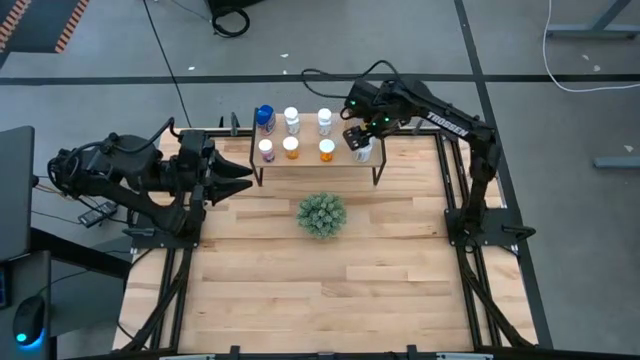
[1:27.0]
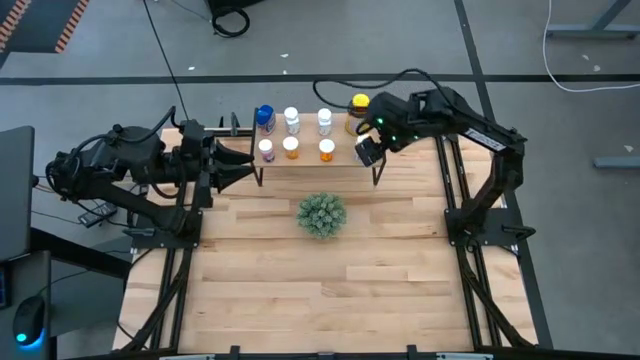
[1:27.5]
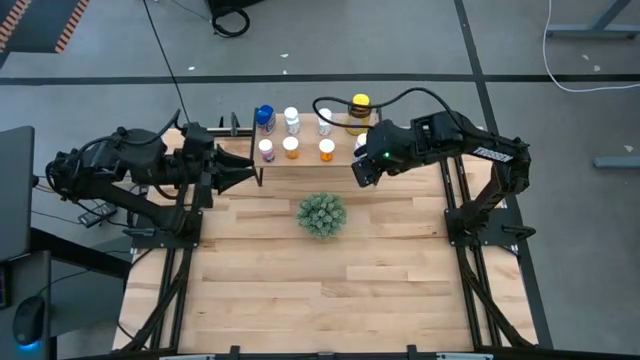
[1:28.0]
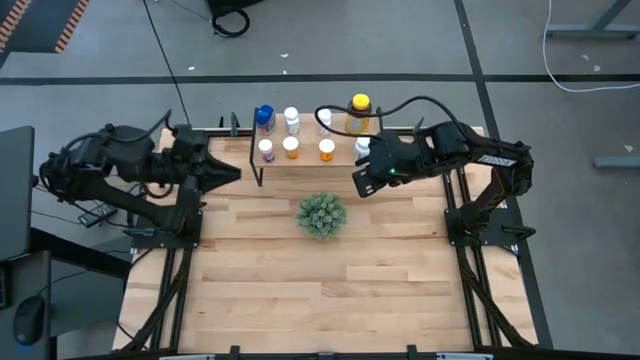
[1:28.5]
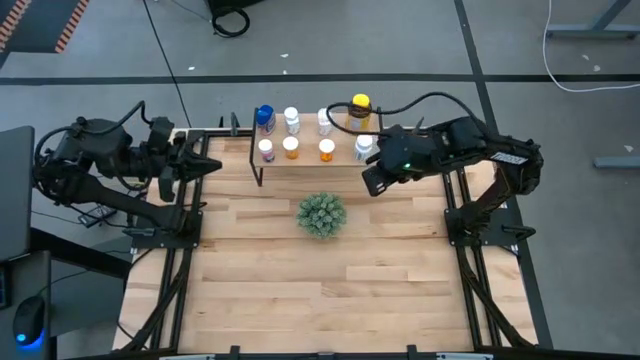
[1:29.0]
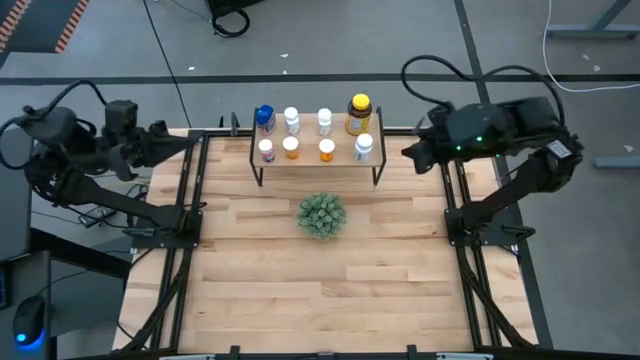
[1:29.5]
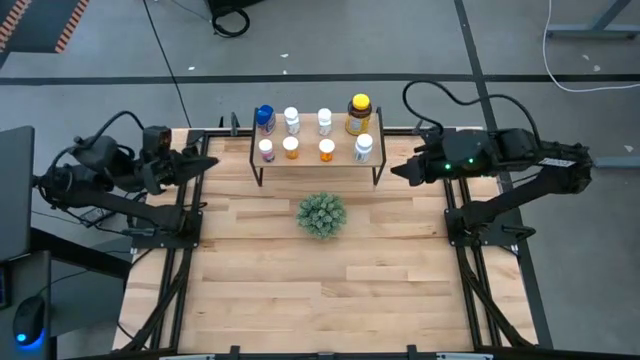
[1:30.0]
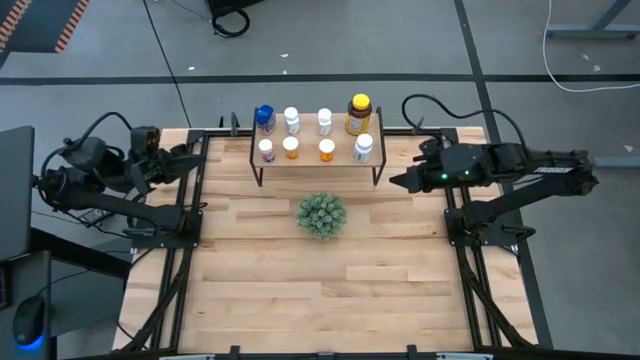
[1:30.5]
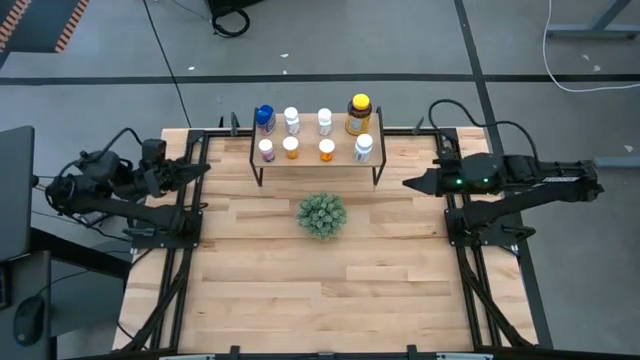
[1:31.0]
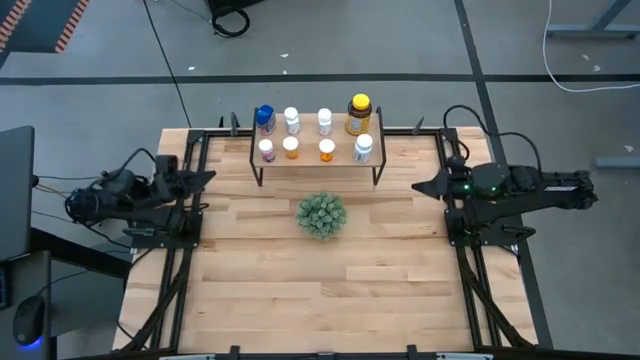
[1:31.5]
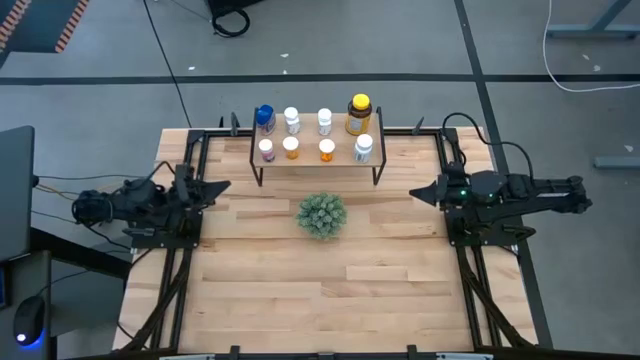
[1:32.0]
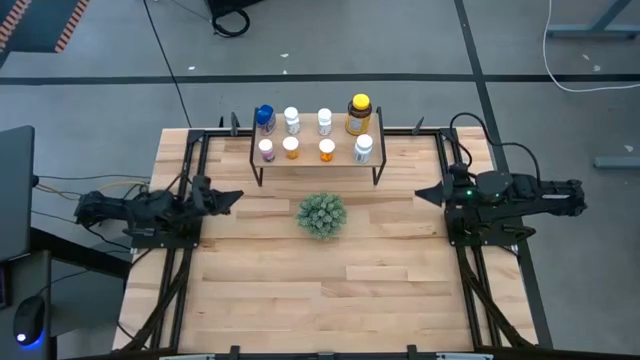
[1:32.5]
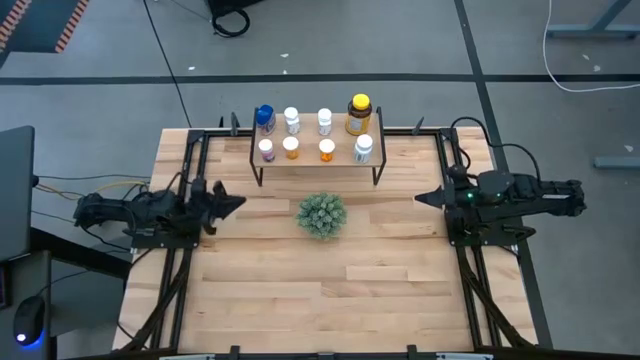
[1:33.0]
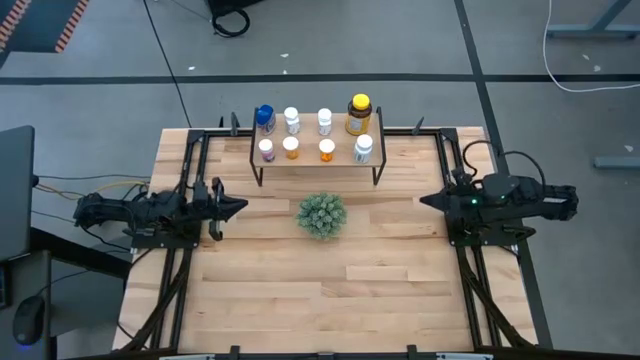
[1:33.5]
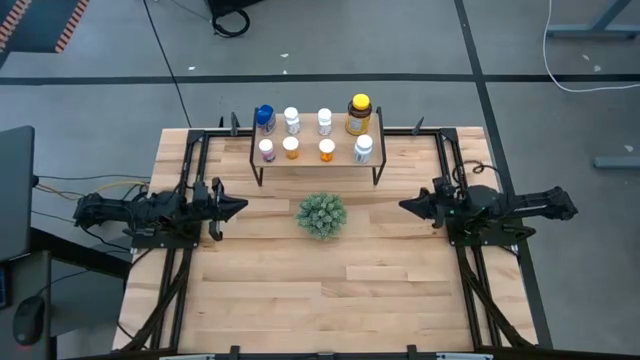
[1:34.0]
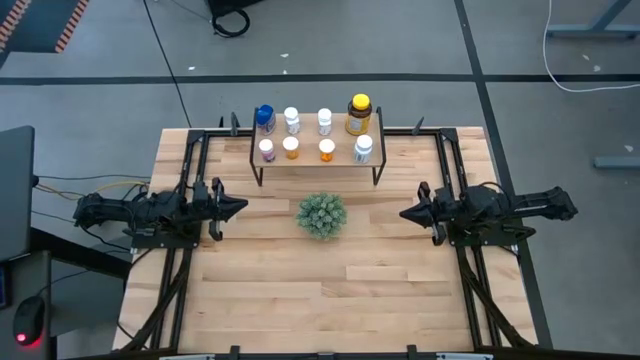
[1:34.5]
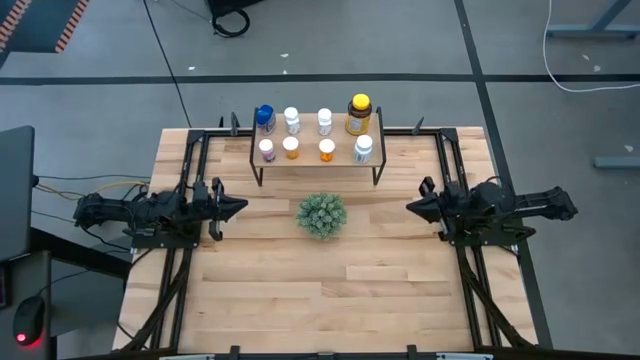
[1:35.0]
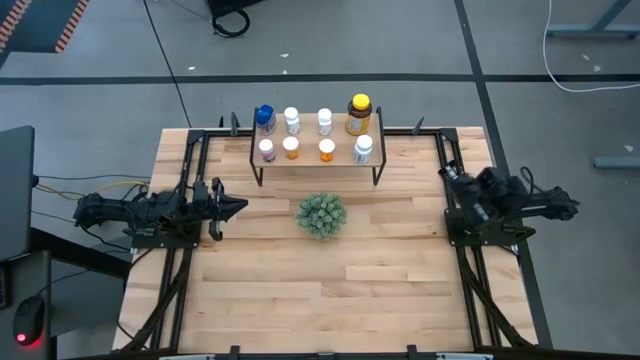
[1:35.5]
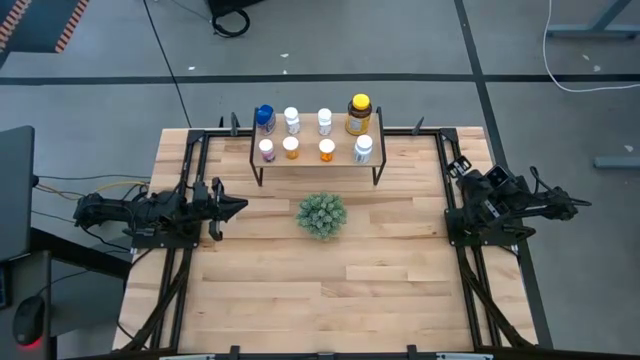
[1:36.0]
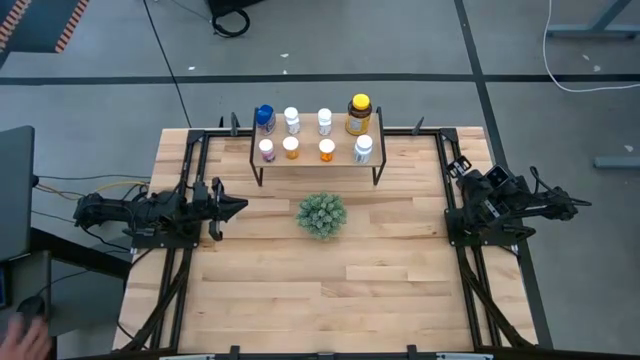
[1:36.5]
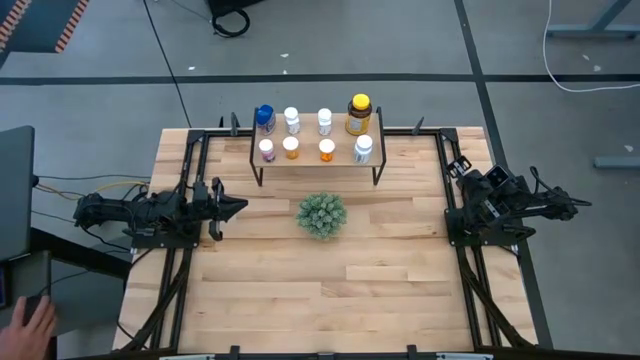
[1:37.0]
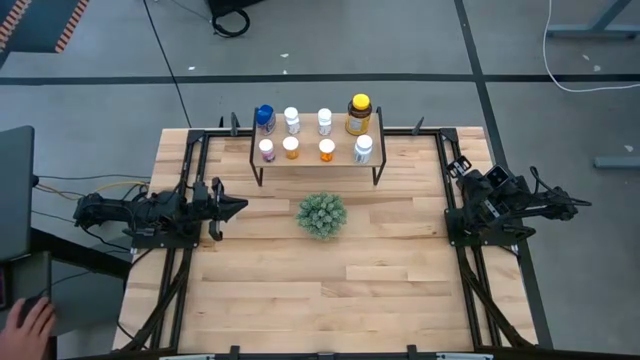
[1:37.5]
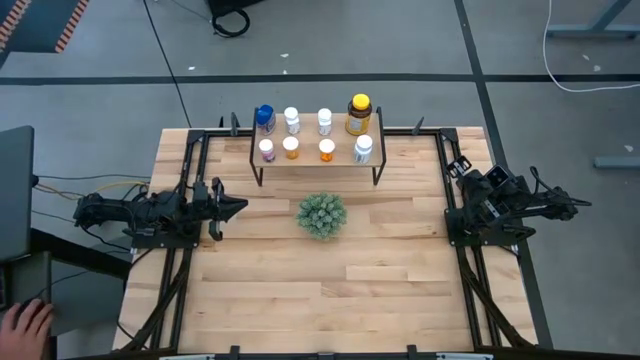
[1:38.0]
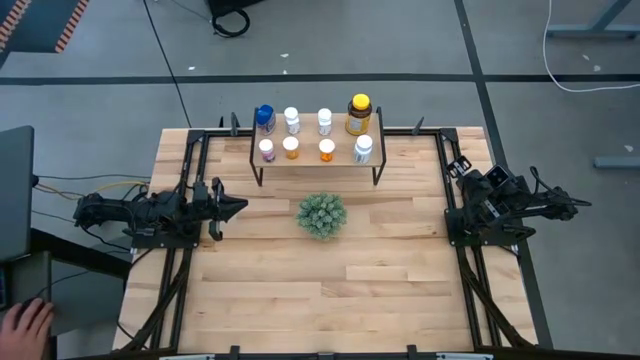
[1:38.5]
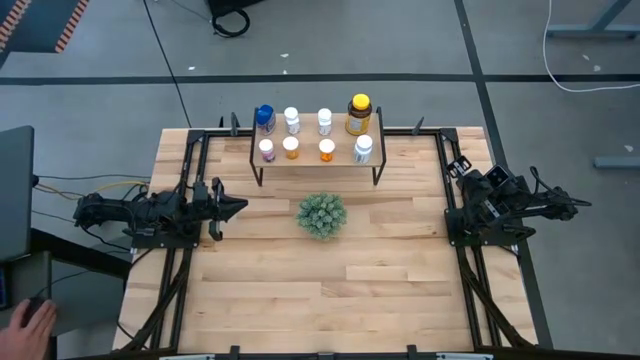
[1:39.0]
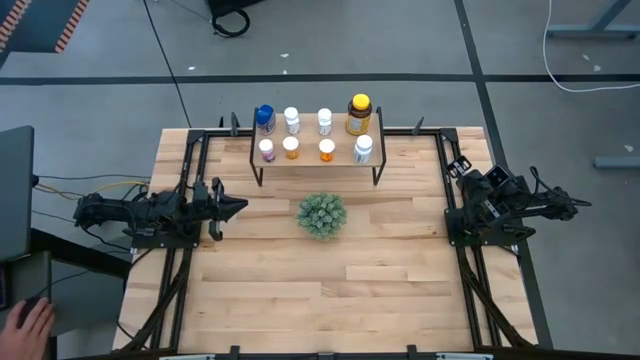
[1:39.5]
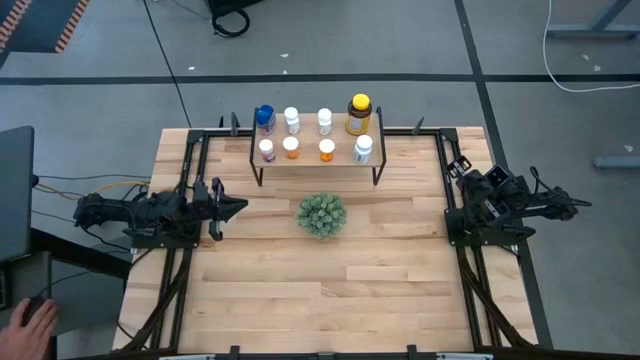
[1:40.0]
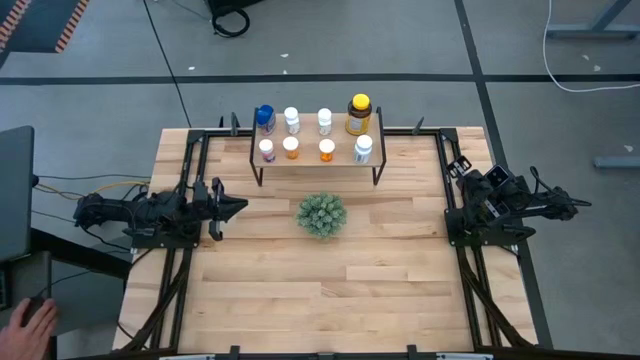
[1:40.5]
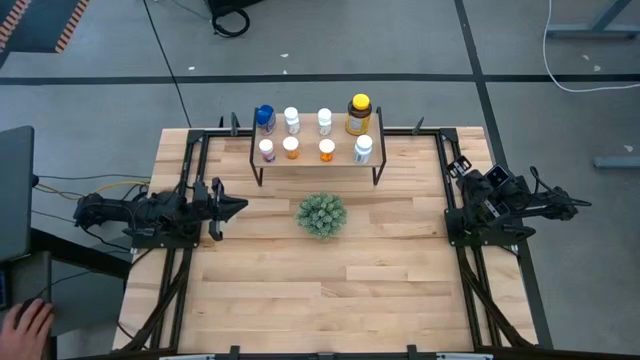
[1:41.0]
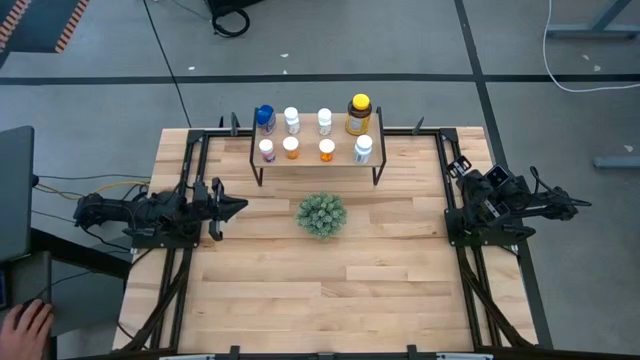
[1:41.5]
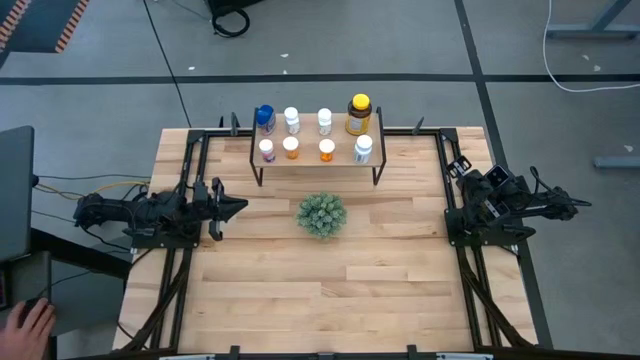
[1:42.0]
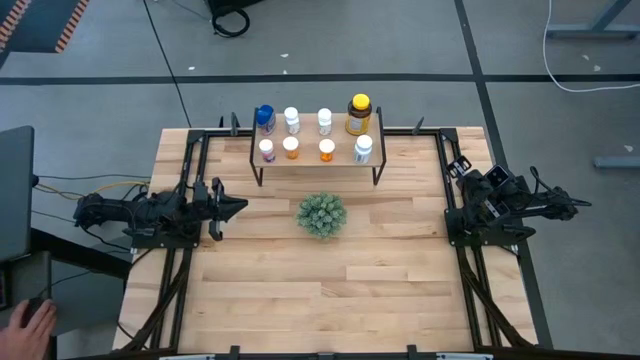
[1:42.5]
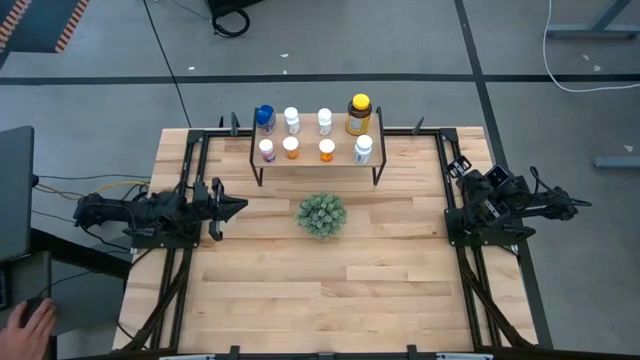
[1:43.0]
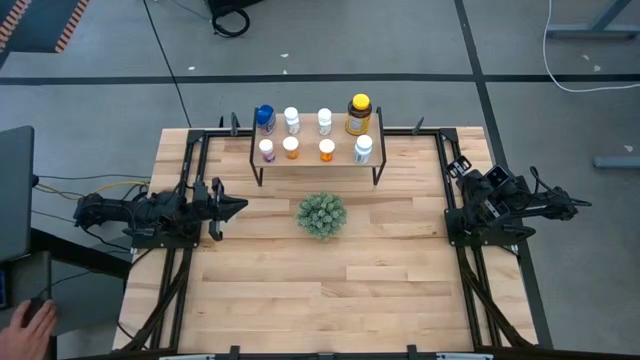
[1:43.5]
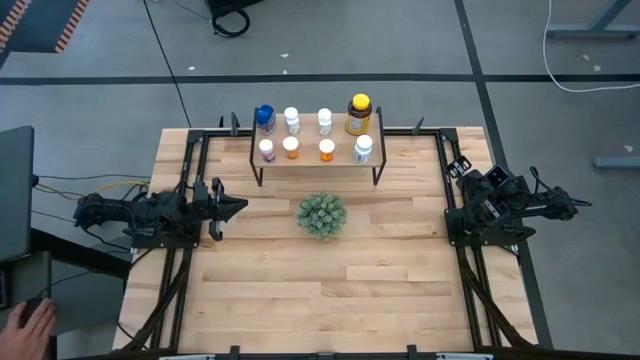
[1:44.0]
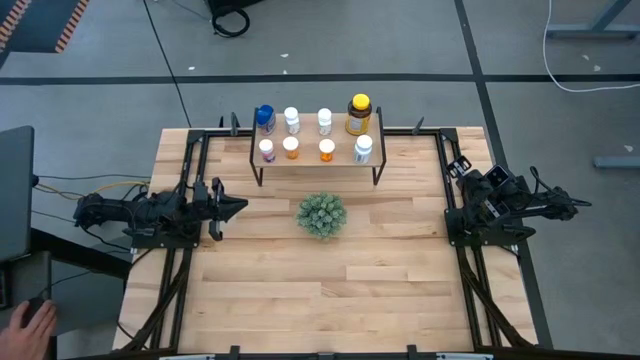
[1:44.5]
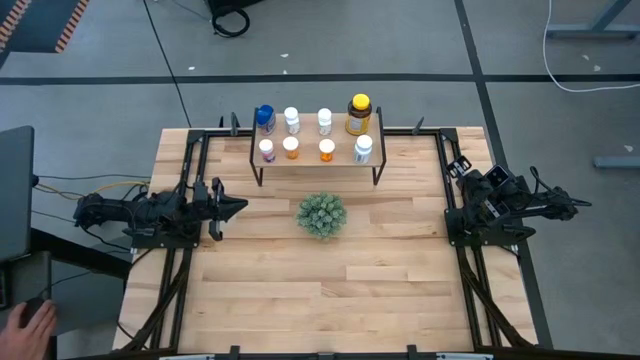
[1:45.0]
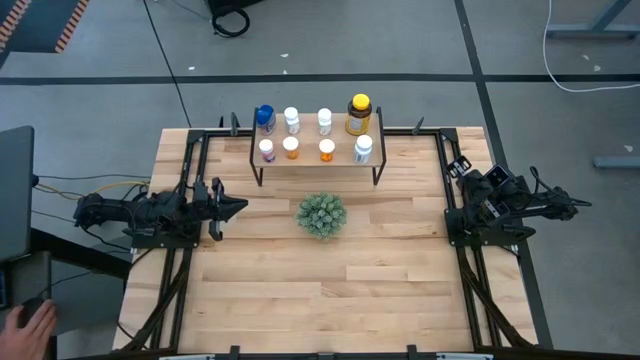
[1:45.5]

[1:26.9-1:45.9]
Task: Pick and place medicine bottles onto shelf by color
Return to Home Position

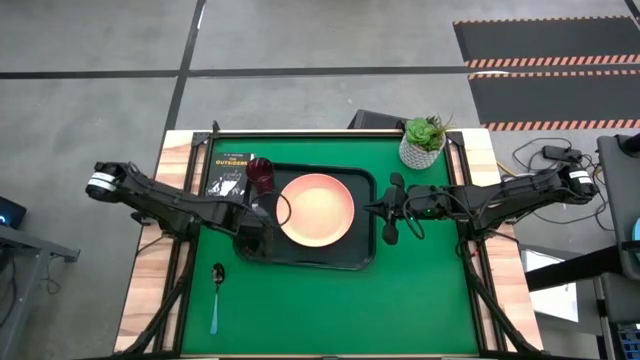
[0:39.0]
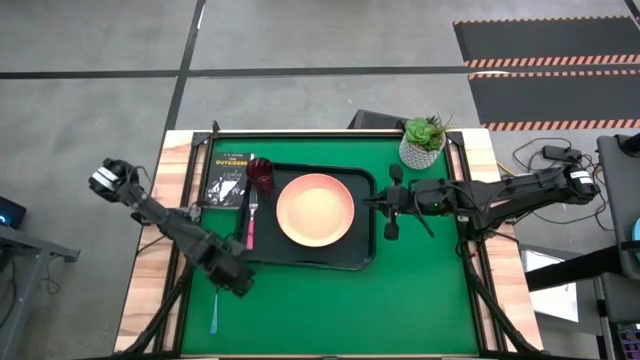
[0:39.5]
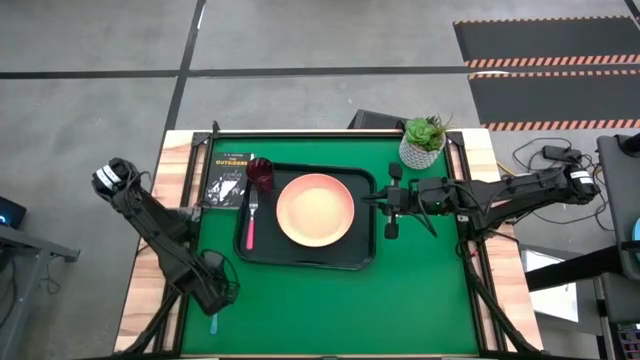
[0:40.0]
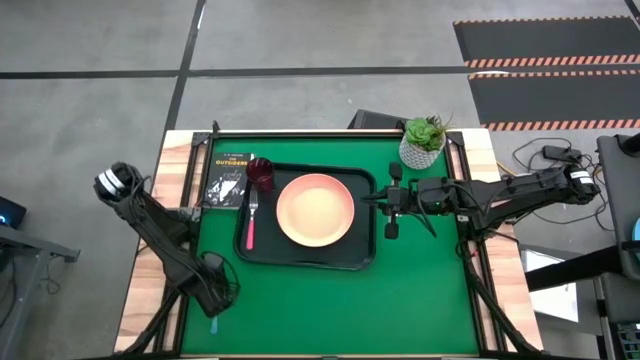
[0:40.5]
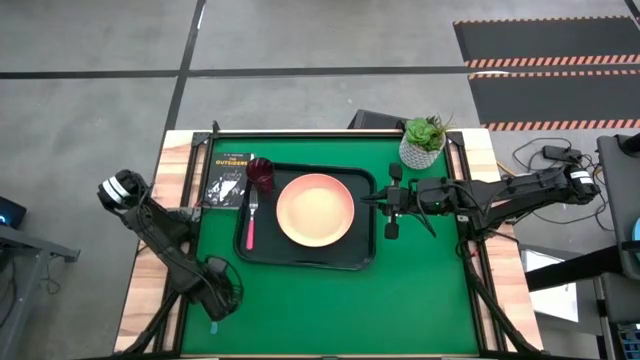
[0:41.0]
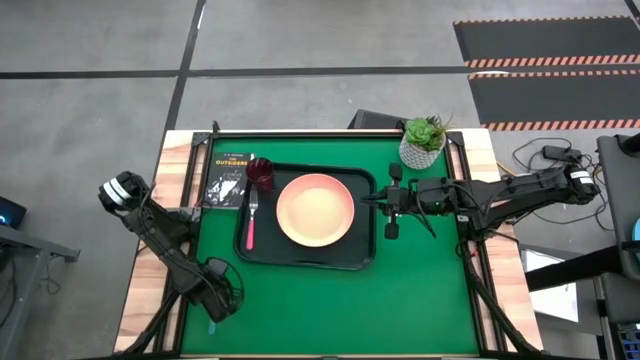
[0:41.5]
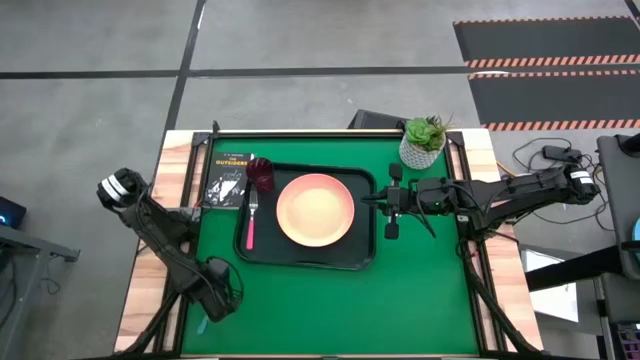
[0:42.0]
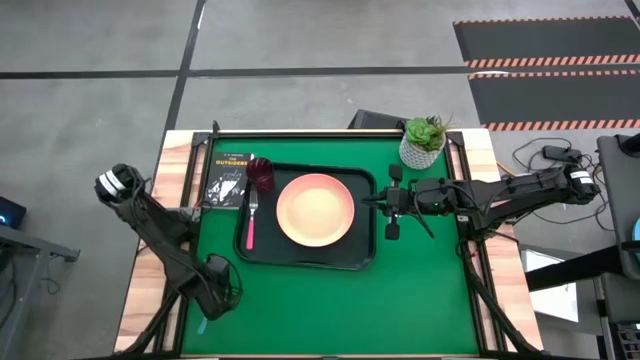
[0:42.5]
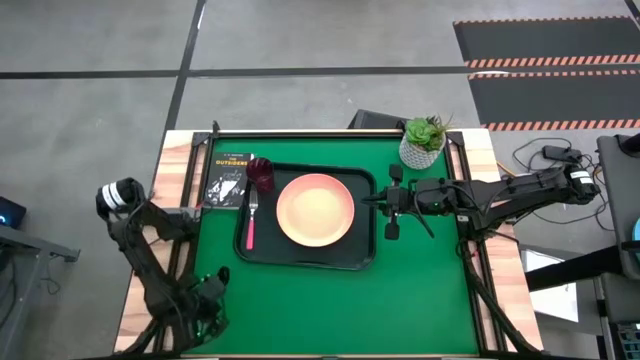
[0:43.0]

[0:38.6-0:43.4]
Task: Pick and place plate/cup/fork/spoon on tray
Put the blue spoon on the black table tray between the pink fork and the orange plate
